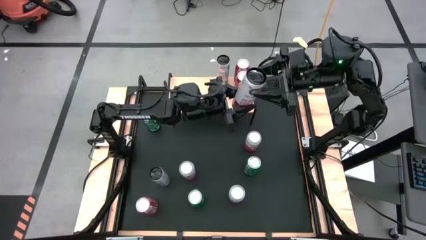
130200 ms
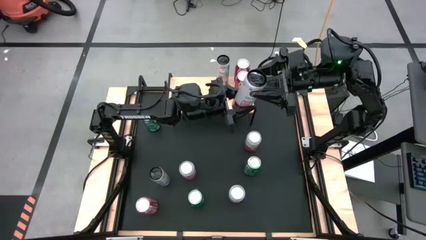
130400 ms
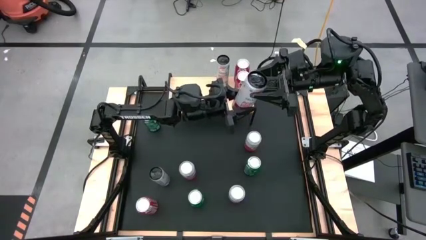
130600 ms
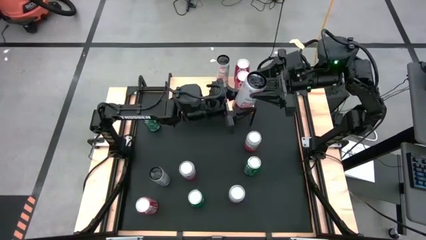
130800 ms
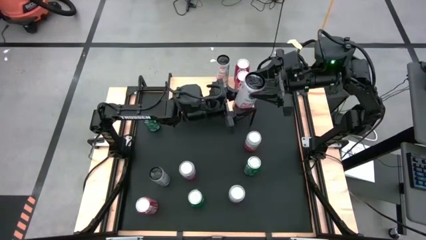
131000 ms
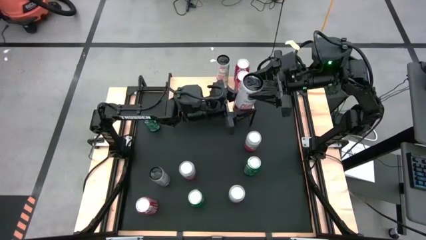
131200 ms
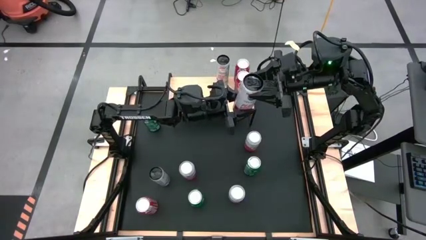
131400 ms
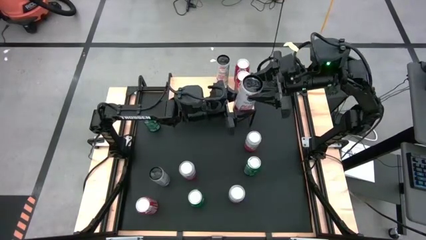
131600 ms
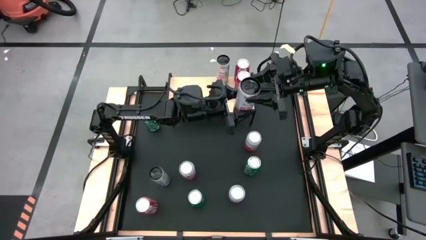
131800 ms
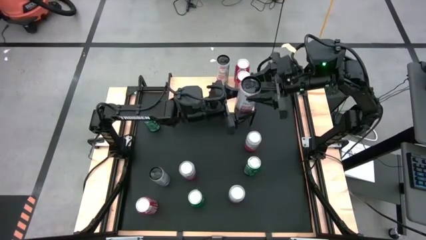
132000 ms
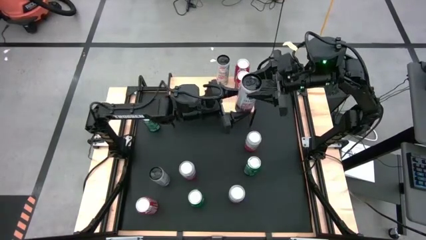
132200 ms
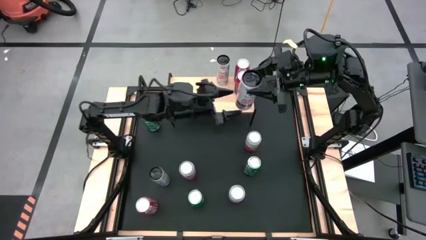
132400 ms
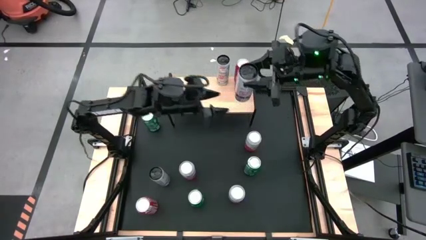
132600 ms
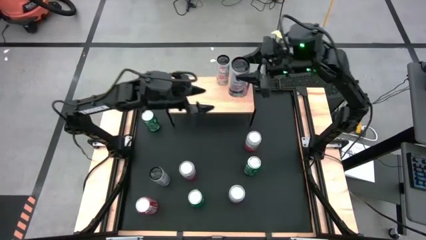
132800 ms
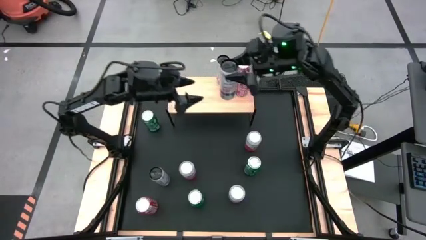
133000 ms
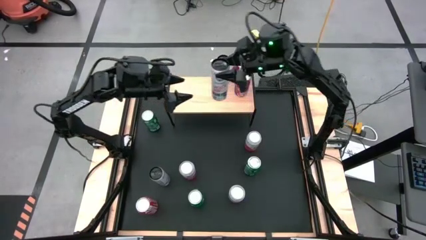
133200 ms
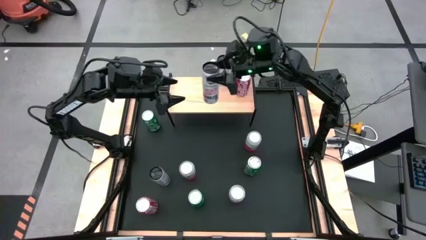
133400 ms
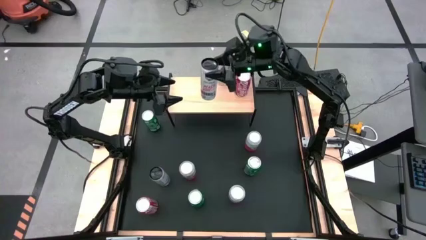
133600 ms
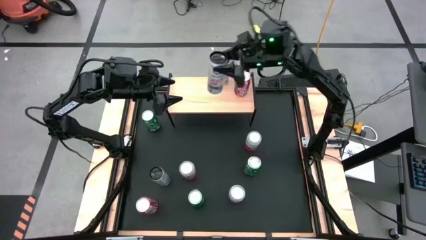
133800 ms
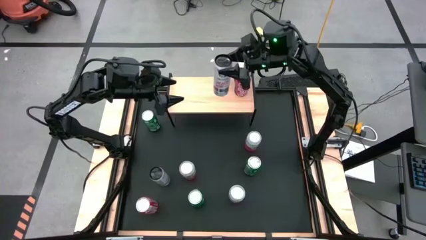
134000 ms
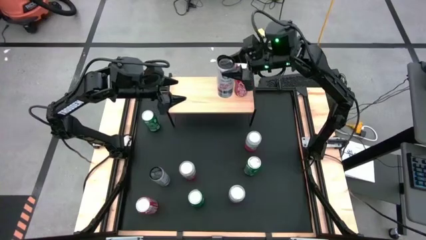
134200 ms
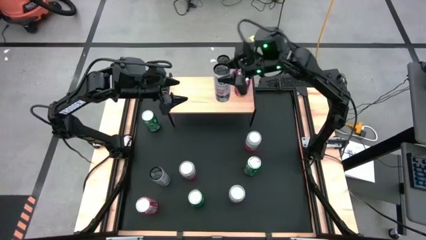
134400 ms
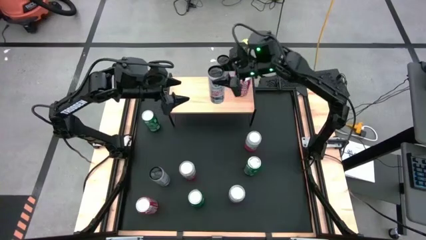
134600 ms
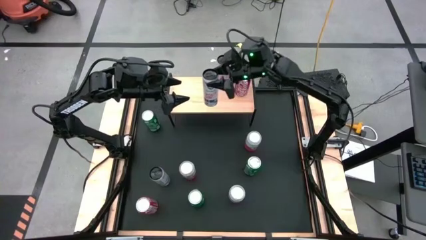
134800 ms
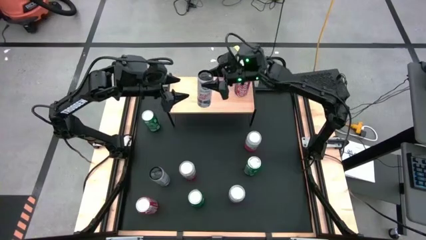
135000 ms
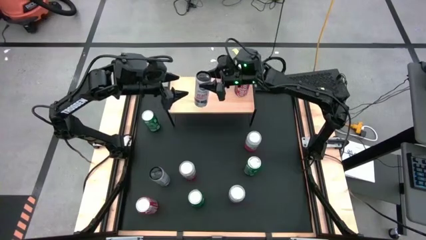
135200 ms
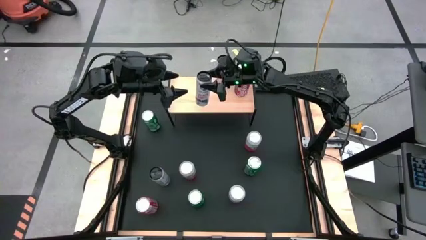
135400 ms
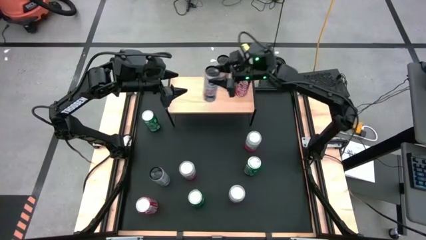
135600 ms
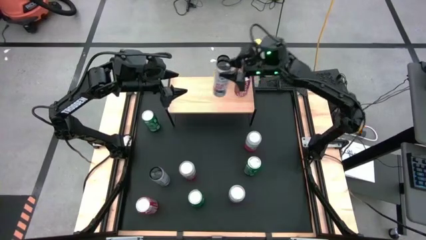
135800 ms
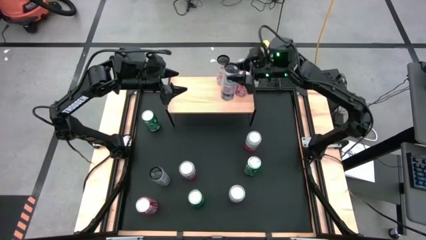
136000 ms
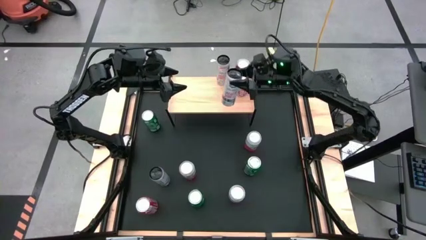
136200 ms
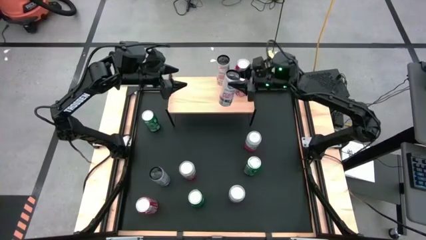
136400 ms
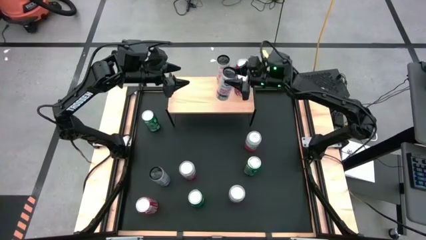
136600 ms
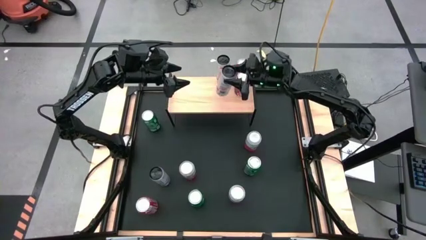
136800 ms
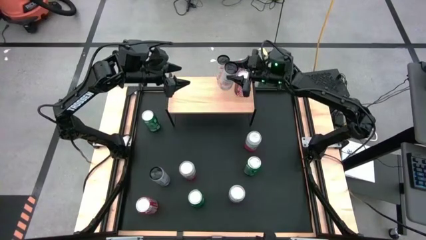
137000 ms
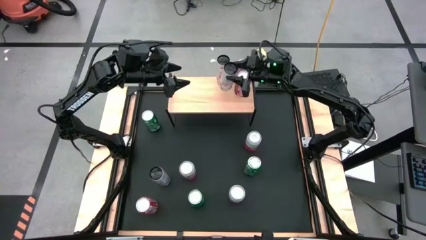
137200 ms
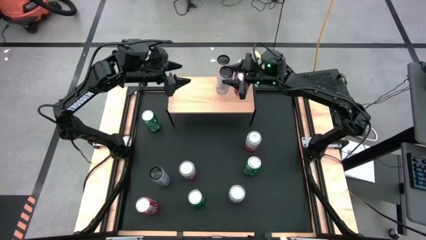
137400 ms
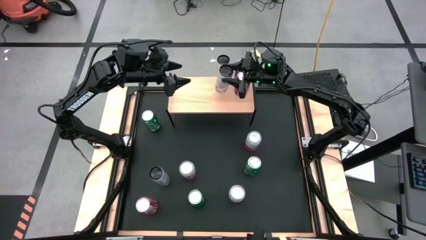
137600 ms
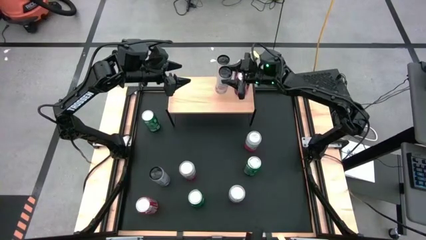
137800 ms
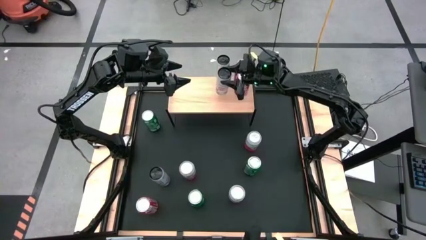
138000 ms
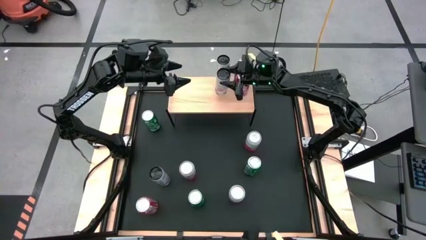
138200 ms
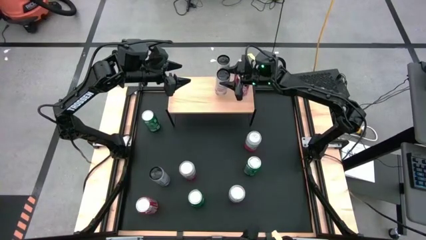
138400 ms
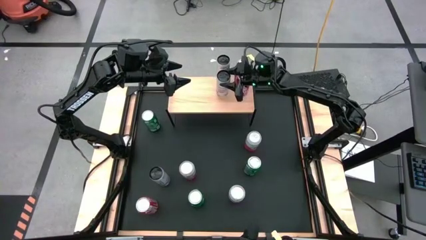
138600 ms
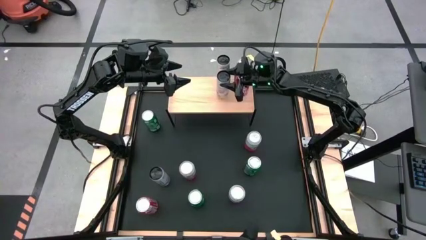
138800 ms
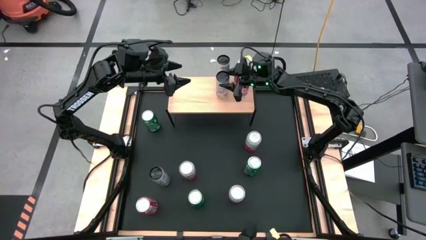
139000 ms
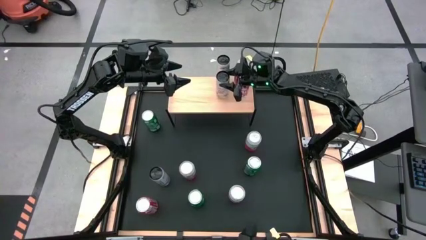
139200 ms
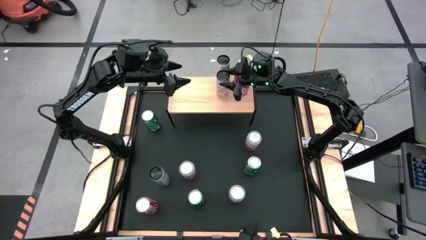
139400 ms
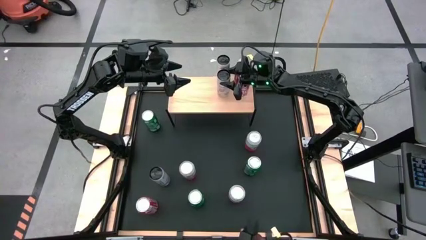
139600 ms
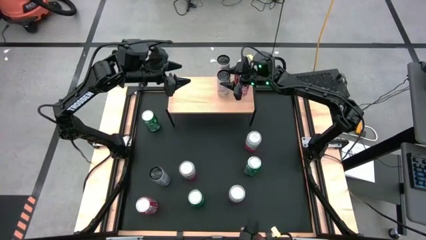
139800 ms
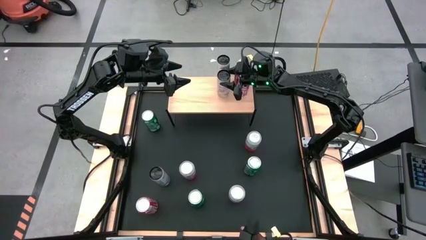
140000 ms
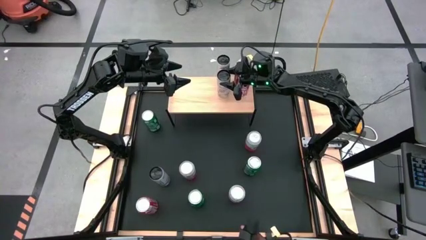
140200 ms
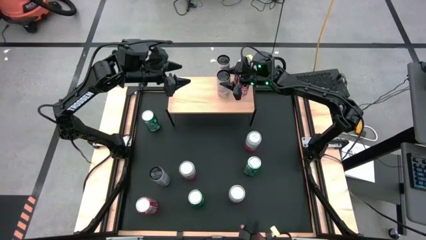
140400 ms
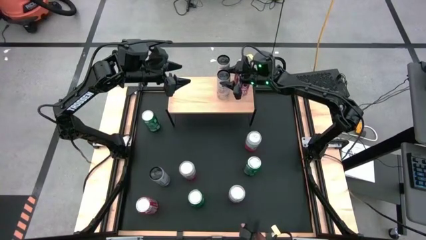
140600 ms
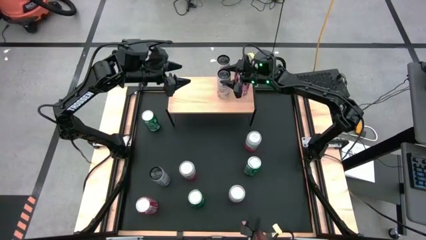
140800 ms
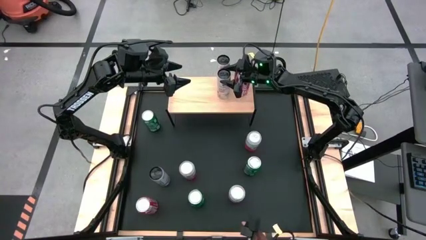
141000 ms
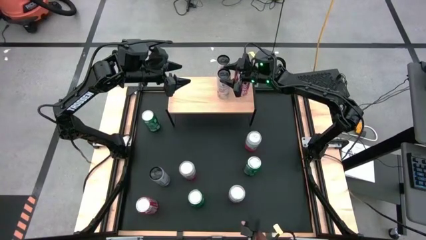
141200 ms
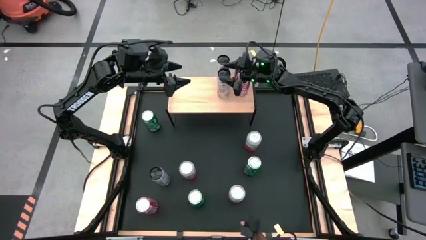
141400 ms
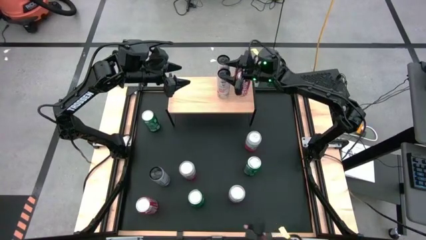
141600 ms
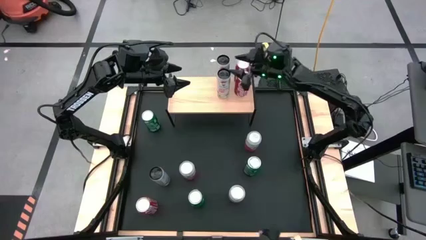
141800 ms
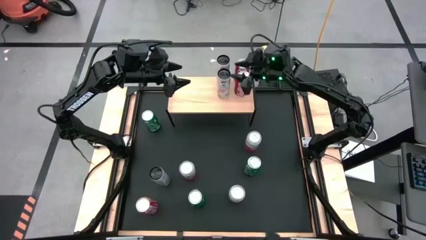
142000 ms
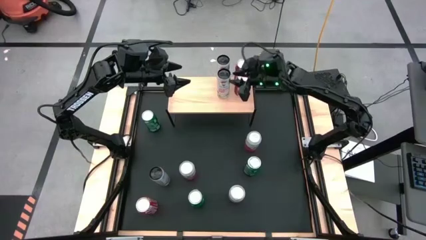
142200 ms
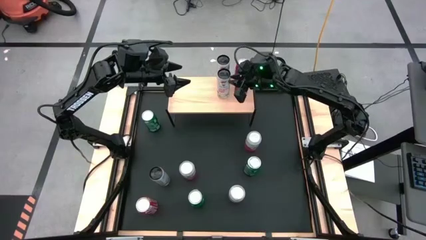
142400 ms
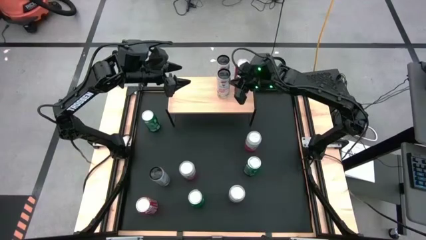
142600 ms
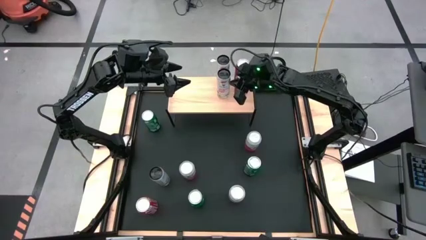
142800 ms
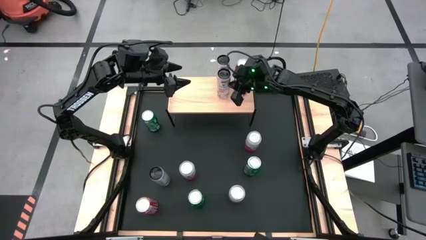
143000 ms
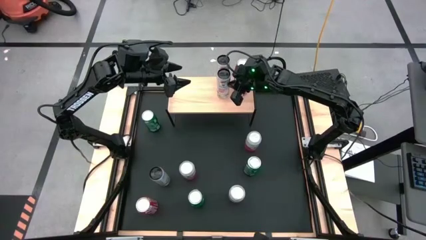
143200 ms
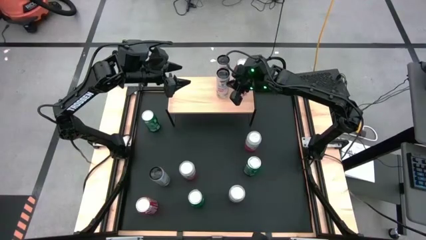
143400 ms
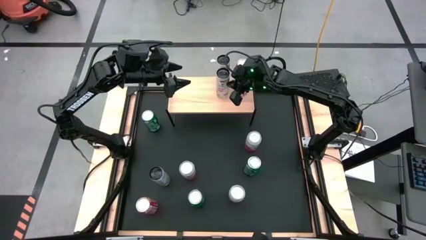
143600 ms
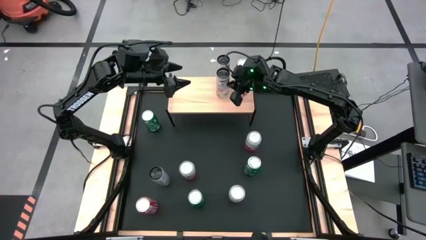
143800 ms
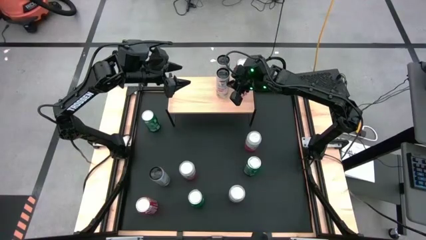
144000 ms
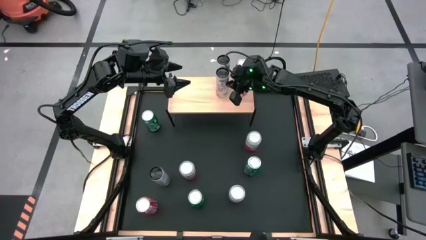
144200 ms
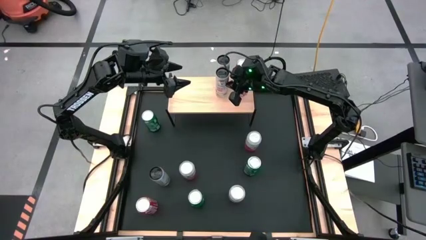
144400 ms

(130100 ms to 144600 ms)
Task: Place canned beverage on shelf
Put the bottom white pink soda can aligned with the other white pink soda can on the shelf
